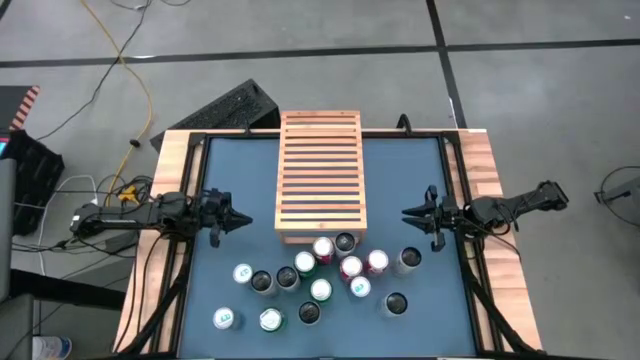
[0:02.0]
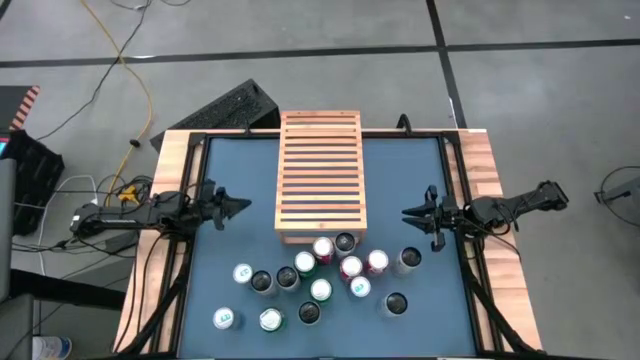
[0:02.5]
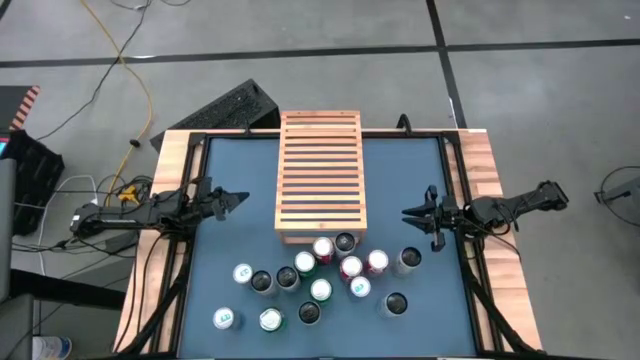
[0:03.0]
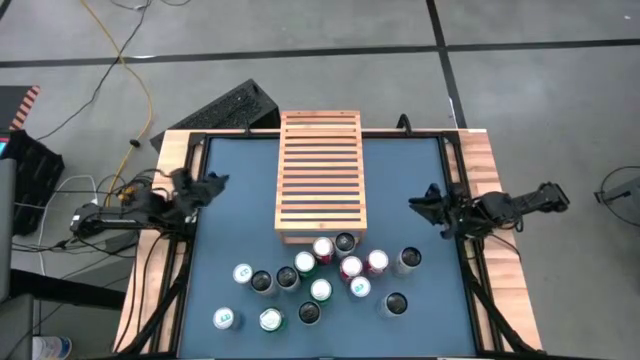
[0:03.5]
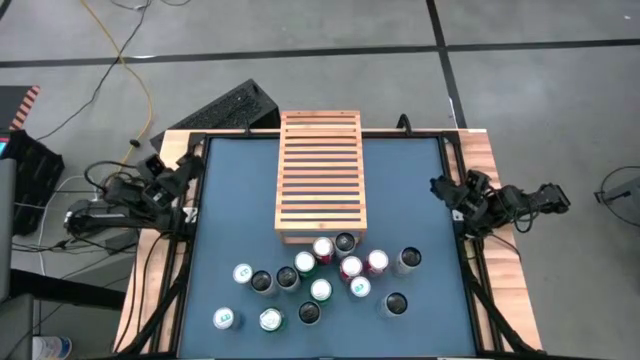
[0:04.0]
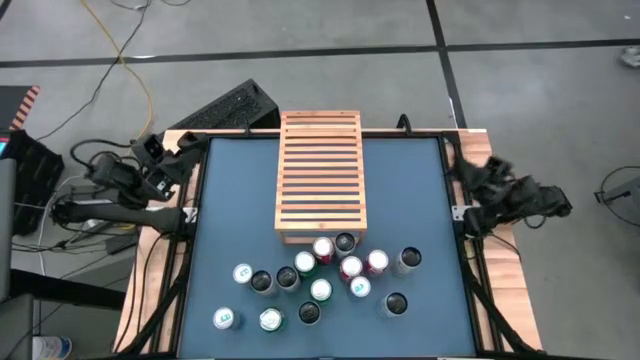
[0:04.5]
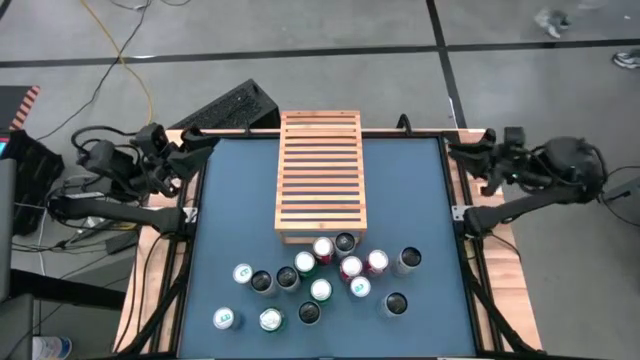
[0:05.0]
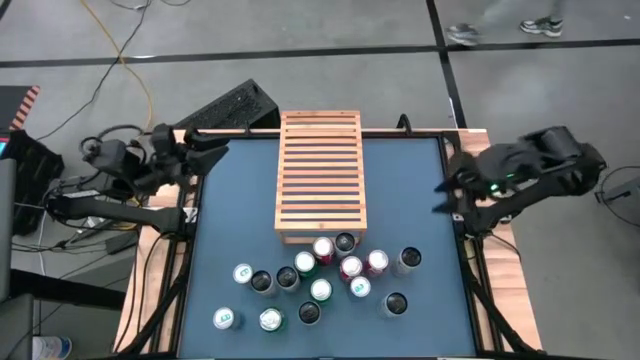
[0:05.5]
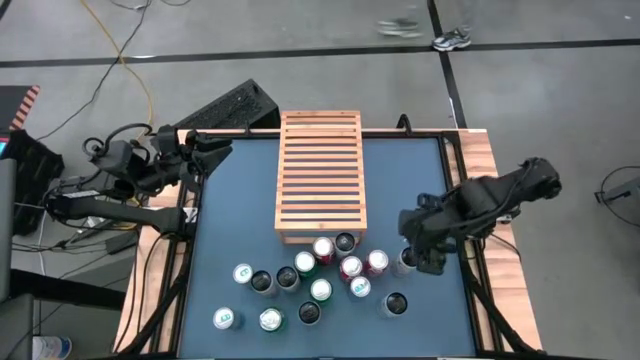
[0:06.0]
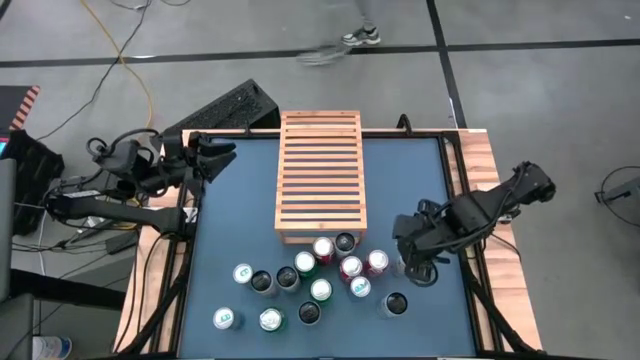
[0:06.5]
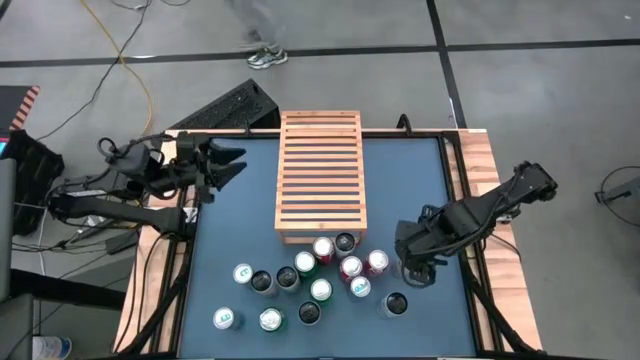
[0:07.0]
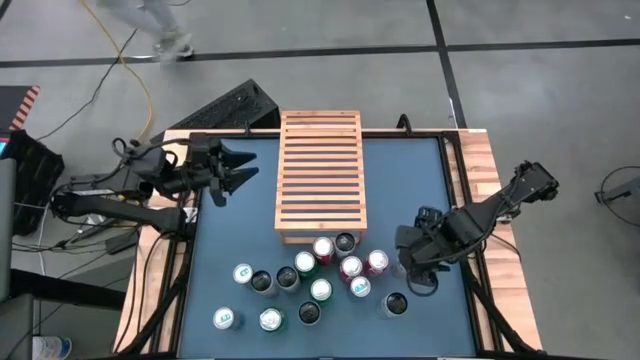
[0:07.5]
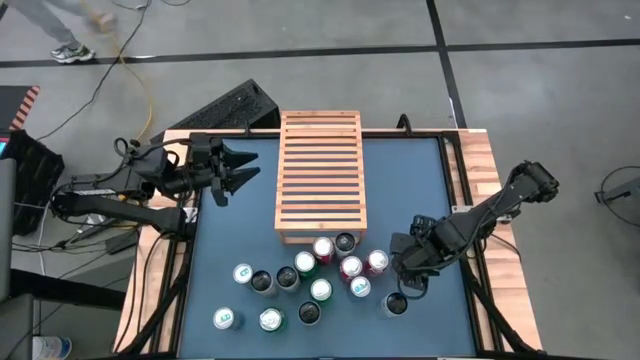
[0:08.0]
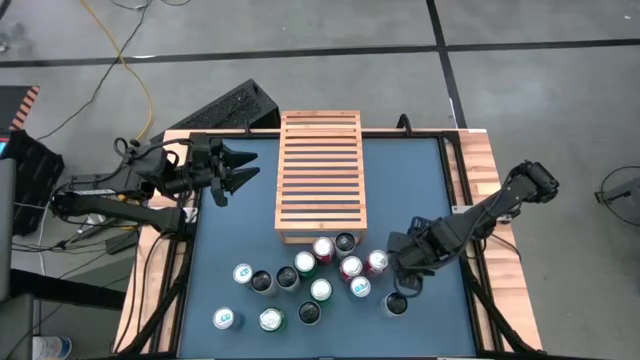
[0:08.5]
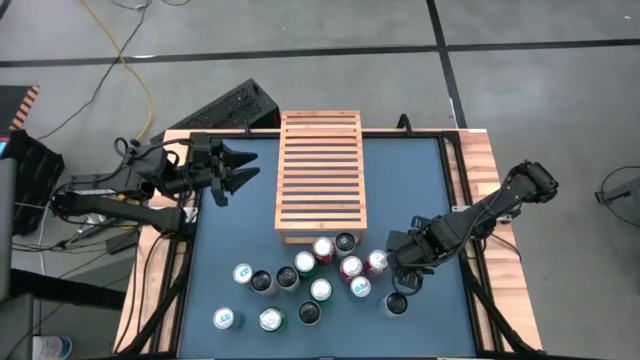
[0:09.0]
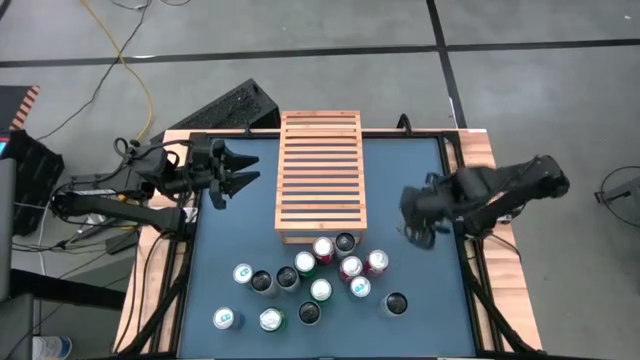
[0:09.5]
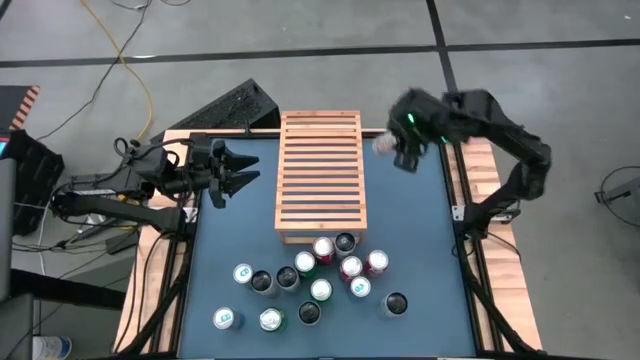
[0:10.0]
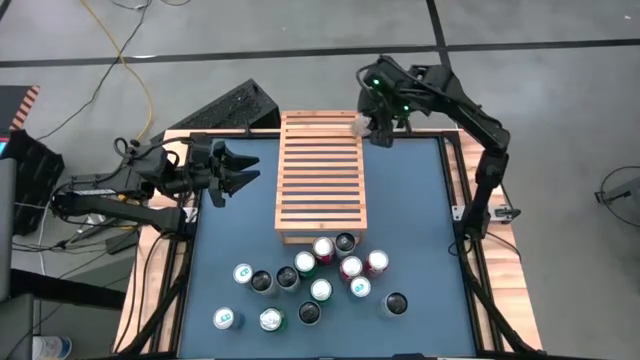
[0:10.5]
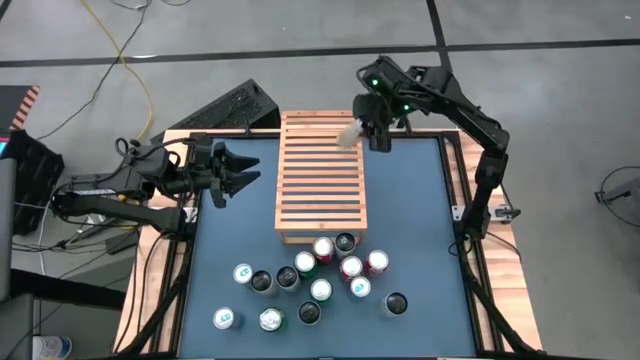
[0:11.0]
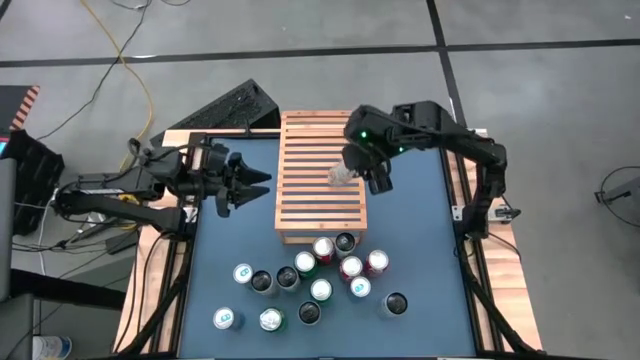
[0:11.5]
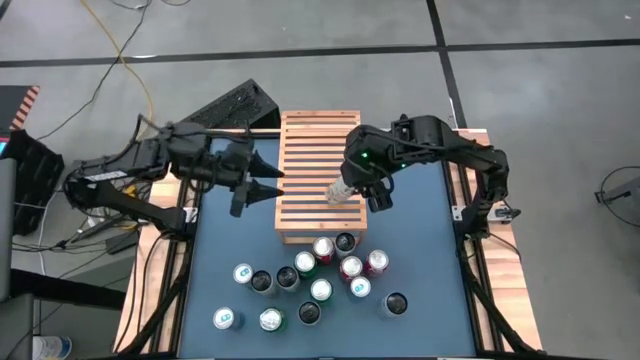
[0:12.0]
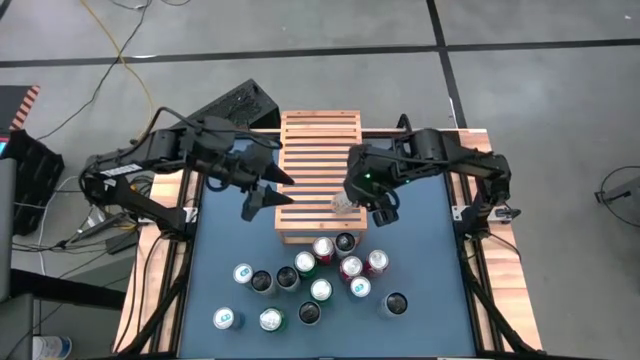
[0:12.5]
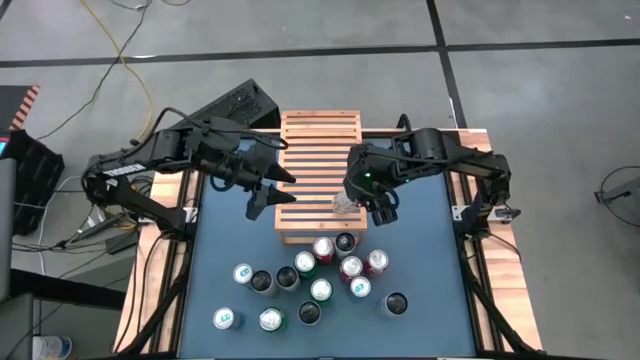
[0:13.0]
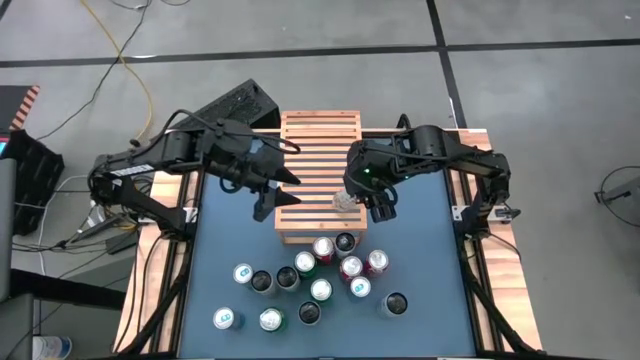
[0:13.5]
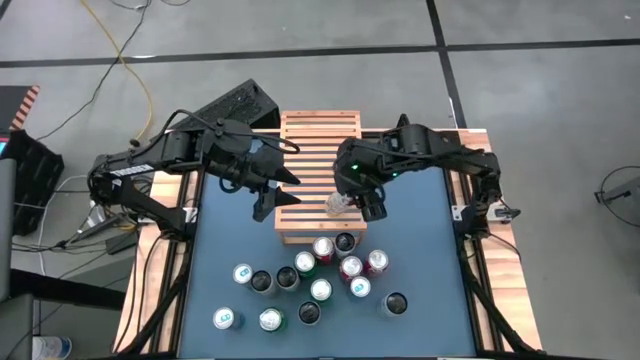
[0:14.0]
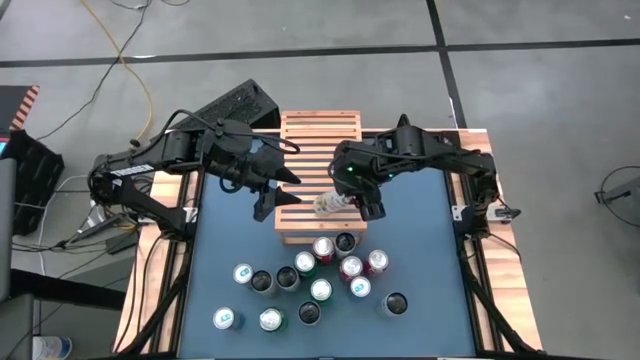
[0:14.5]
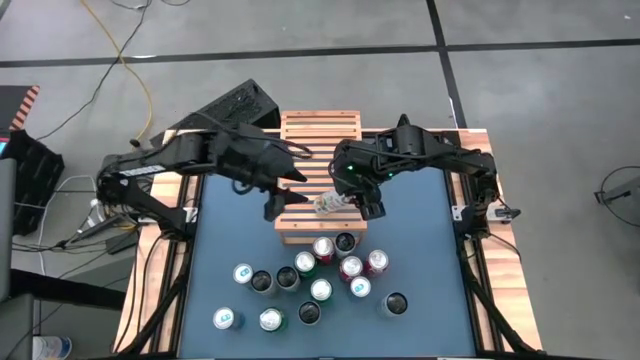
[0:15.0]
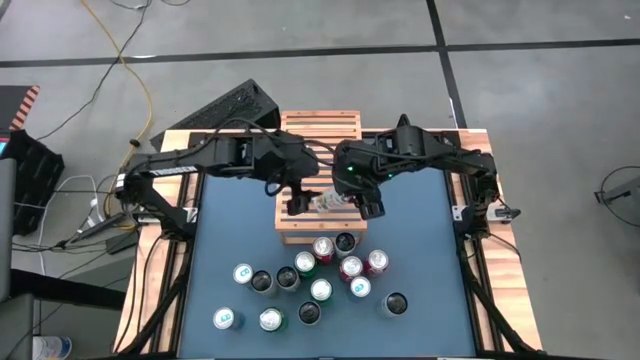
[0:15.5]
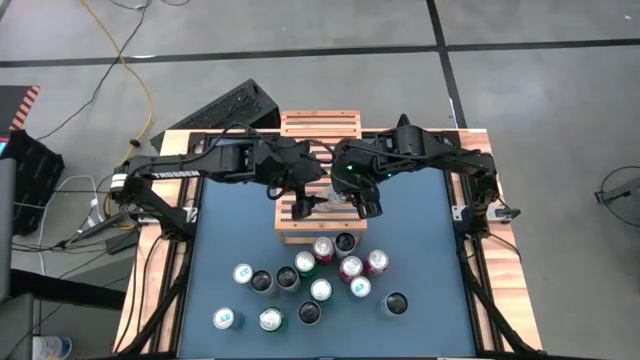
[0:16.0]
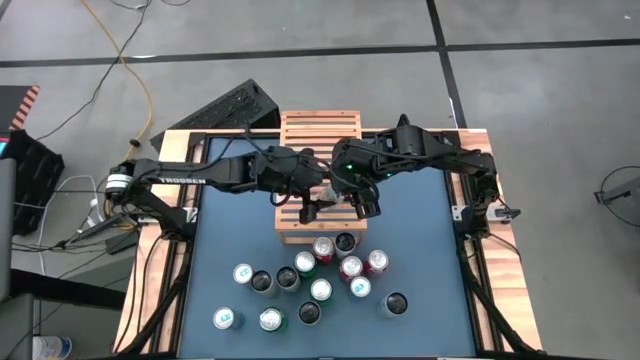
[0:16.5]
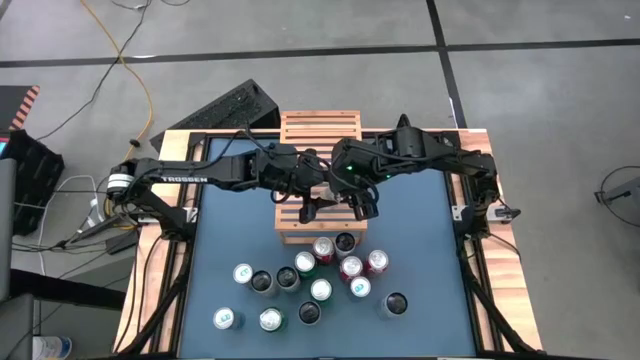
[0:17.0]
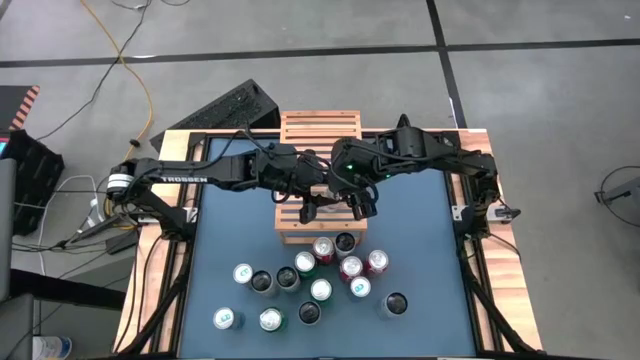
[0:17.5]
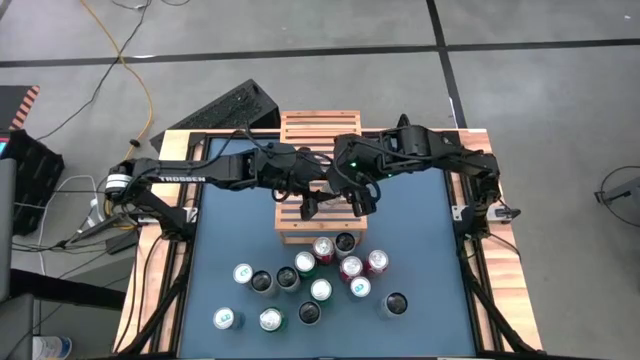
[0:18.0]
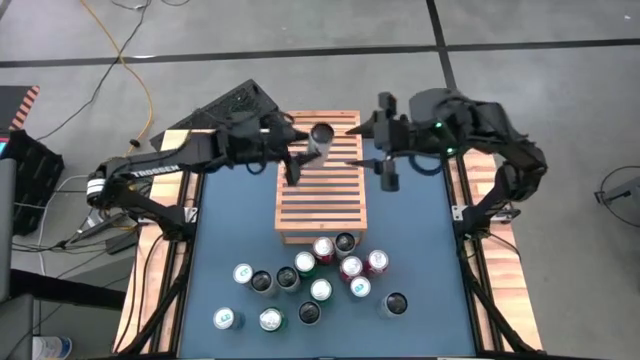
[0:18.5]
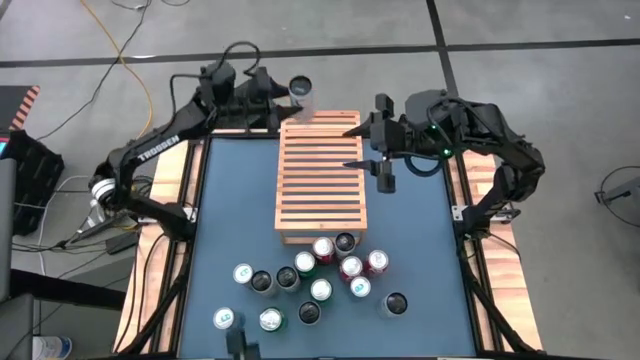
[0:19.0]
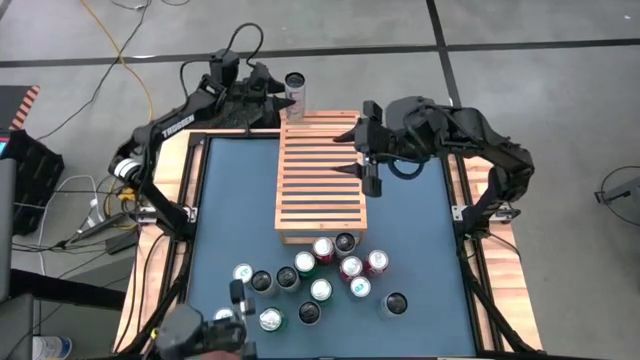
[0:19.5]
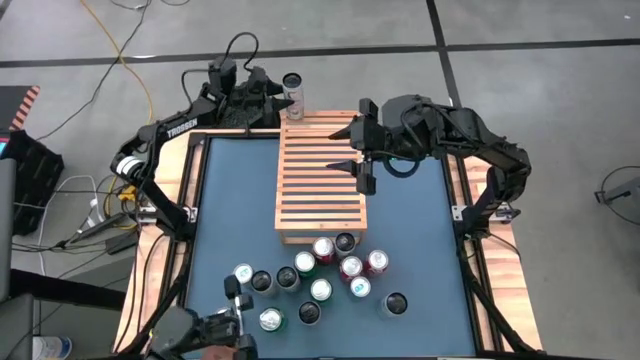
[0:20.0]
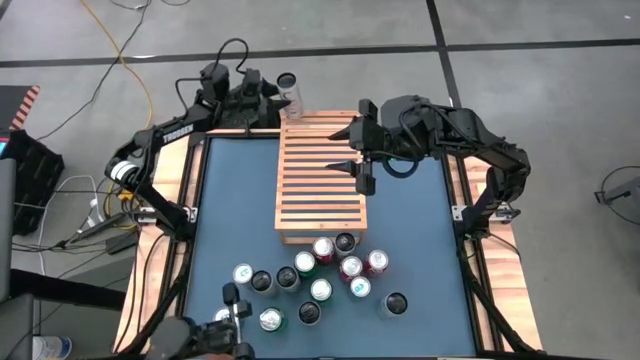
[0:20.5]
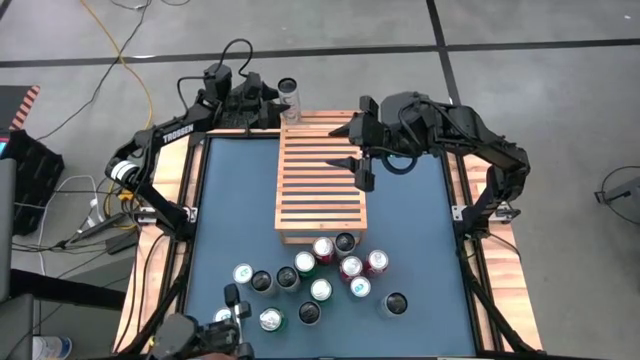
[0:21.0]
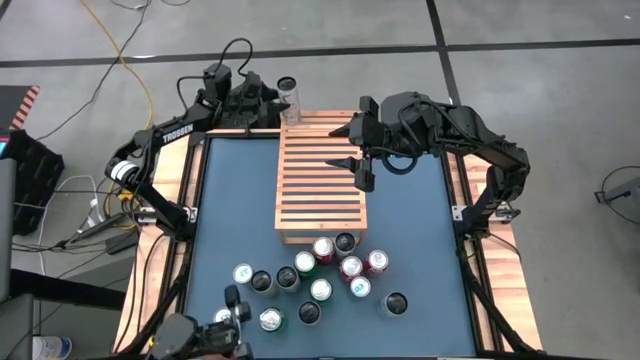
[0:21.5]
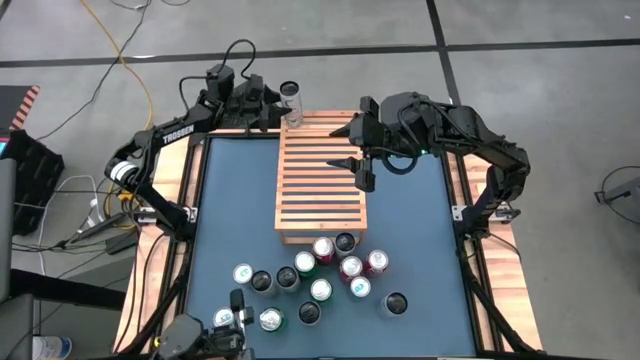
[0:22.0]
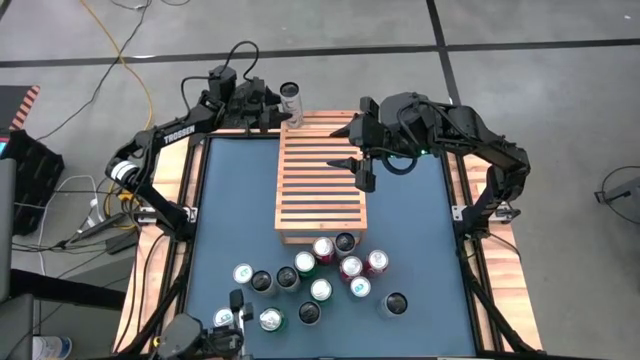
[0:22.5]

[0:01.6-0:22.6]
Task: Place canned beverage on shelf
Put the top right white yellow soda can on the shelf
